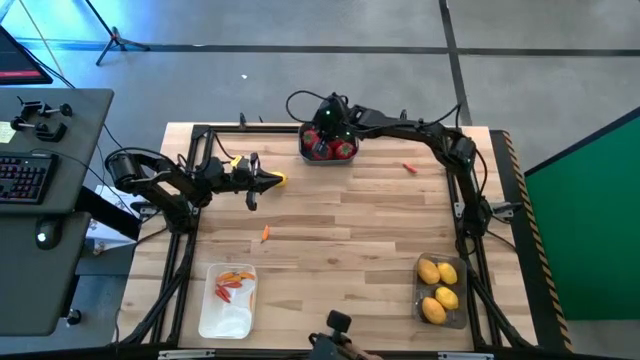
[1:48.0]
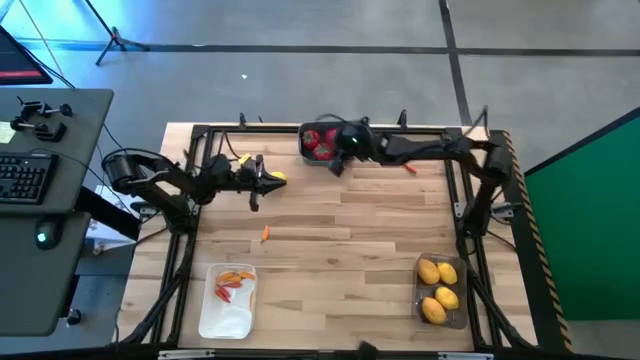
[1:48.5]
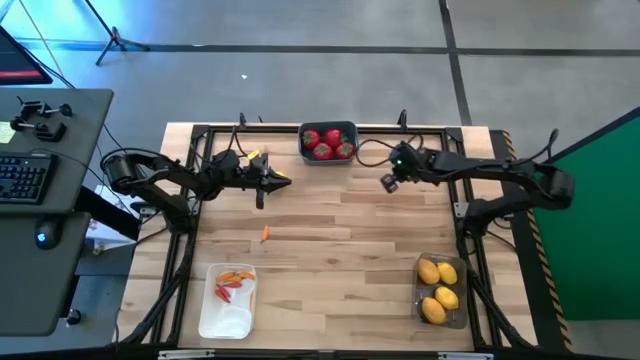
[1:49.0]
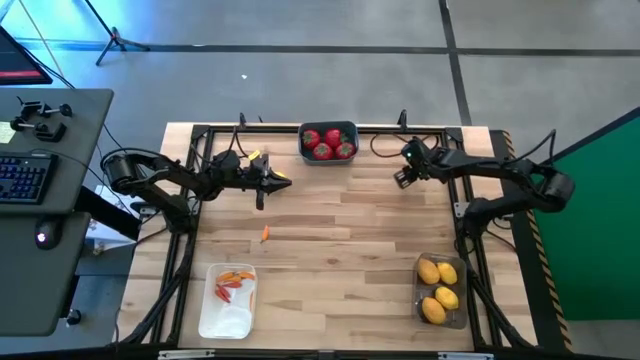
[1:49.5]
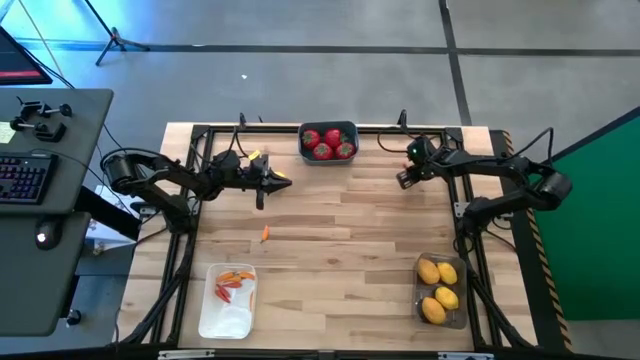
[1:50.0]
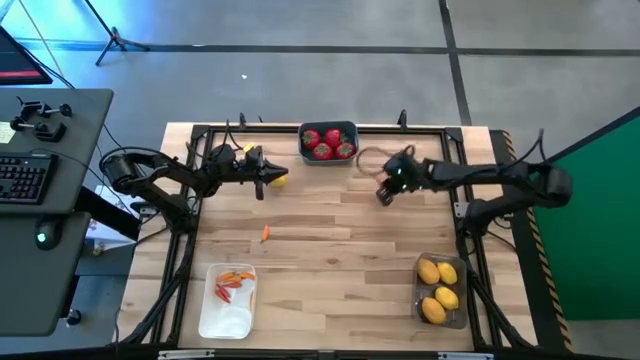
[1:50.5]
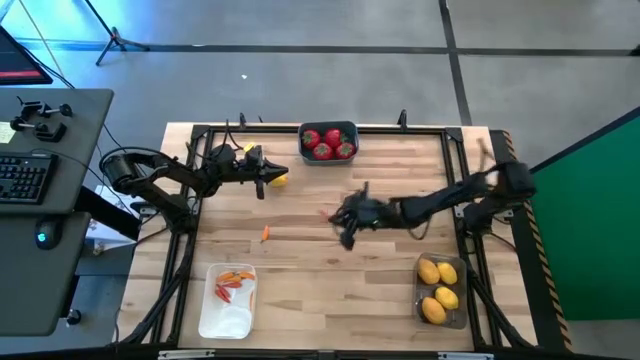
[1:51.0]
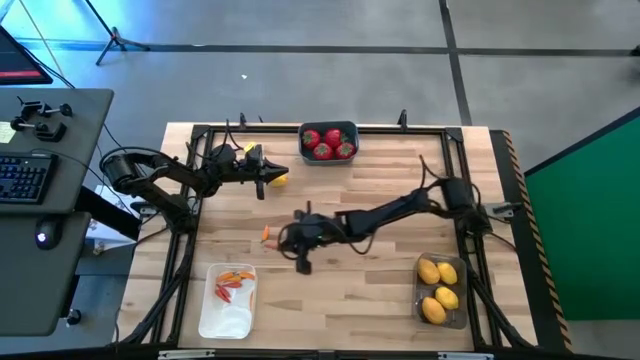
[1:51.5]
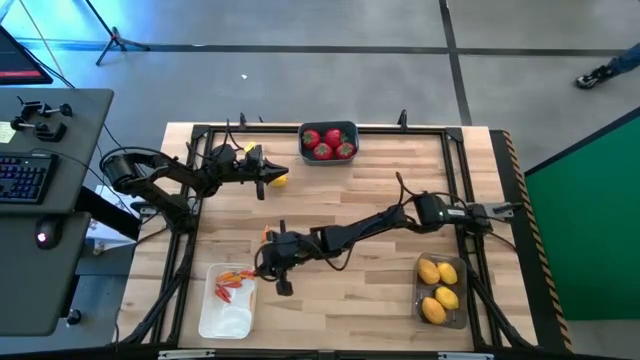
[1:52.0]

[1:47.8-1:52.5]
Task: Sort produce into baskets
Put the red chili pepper into the white bin

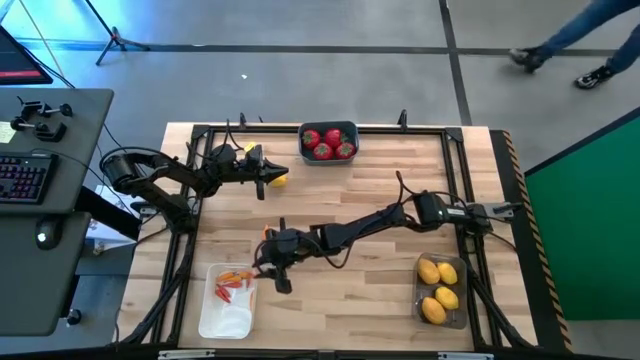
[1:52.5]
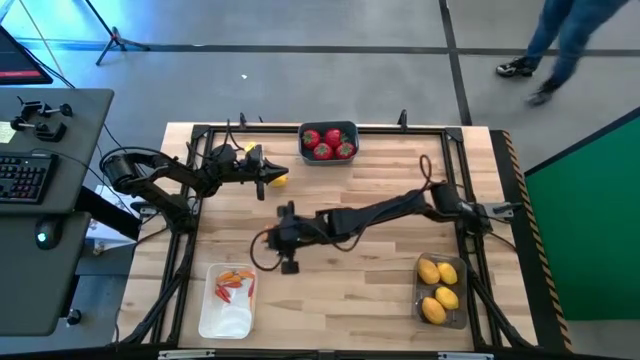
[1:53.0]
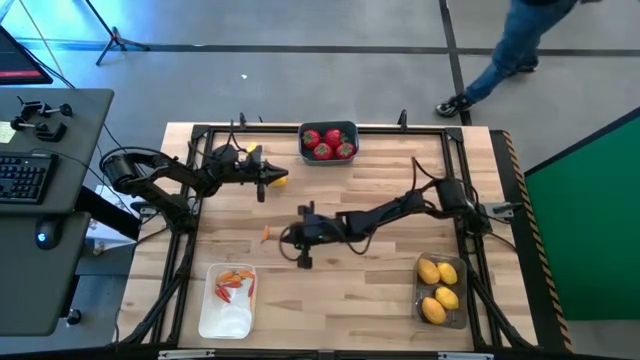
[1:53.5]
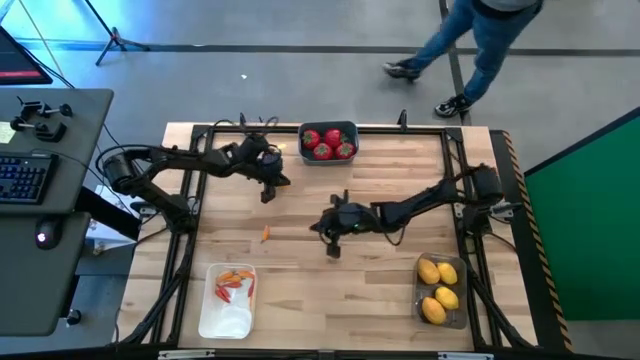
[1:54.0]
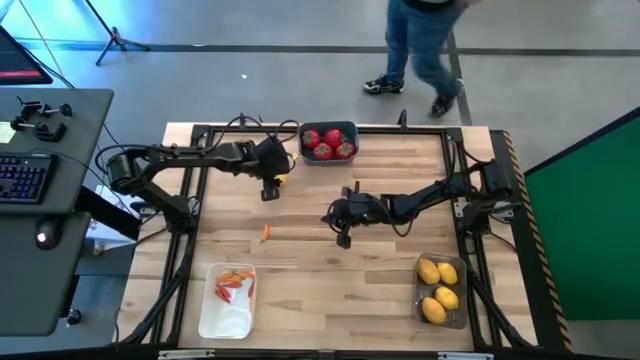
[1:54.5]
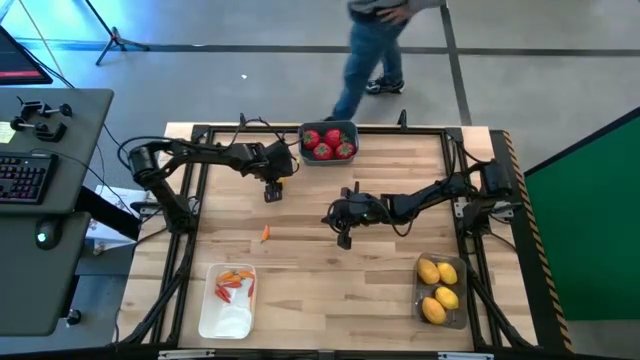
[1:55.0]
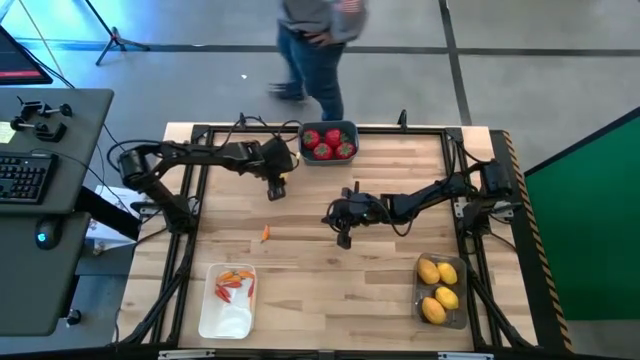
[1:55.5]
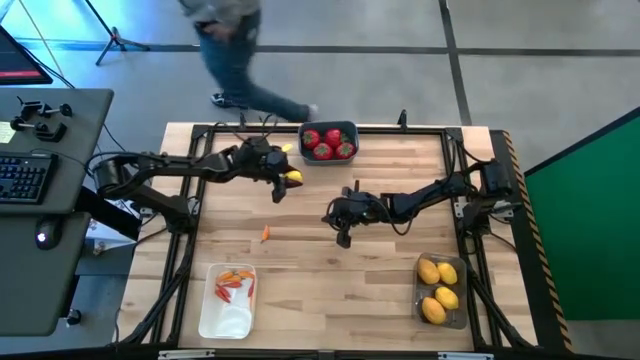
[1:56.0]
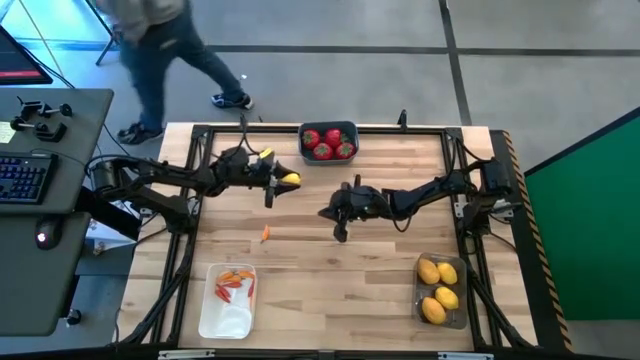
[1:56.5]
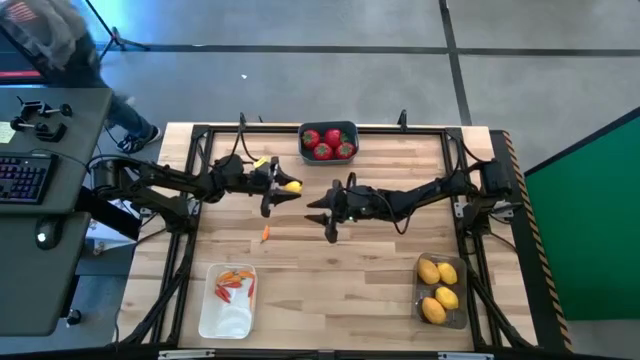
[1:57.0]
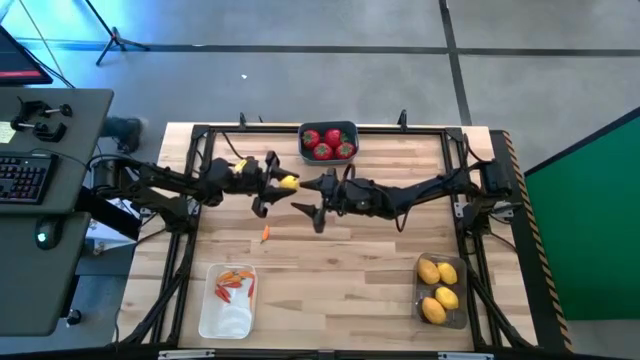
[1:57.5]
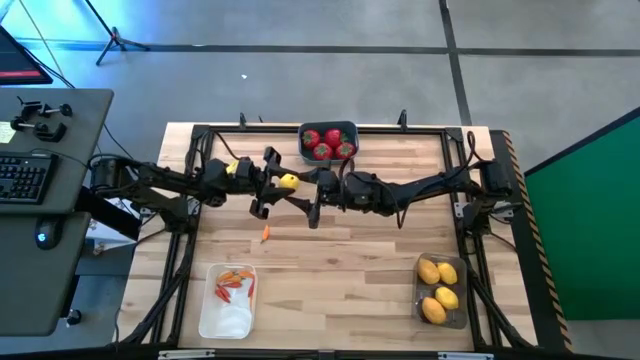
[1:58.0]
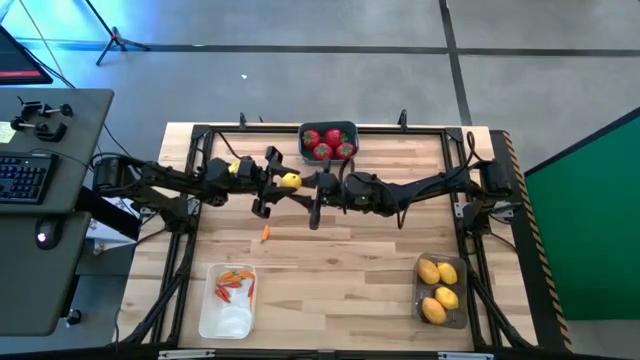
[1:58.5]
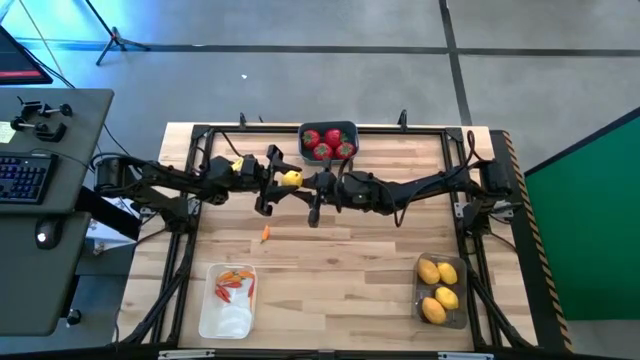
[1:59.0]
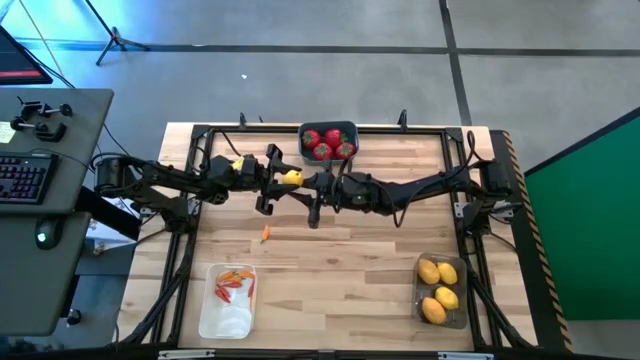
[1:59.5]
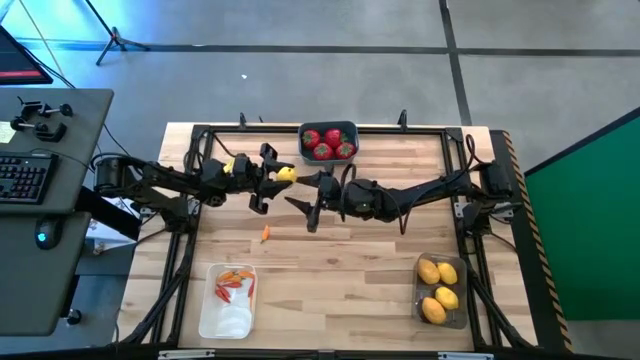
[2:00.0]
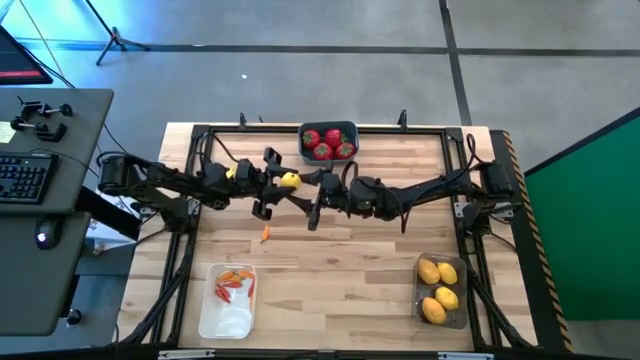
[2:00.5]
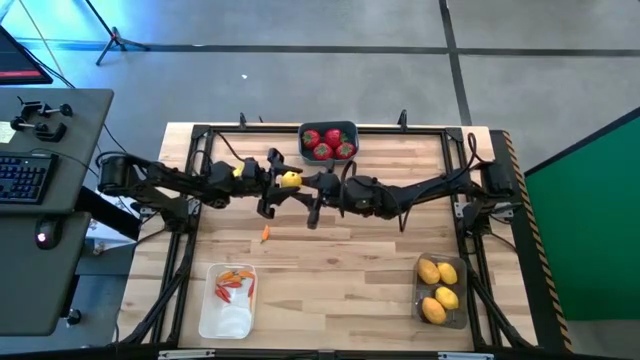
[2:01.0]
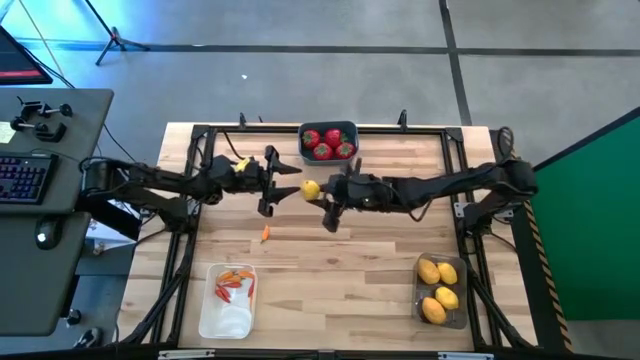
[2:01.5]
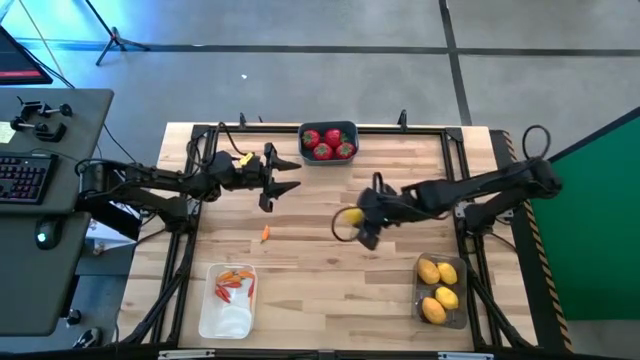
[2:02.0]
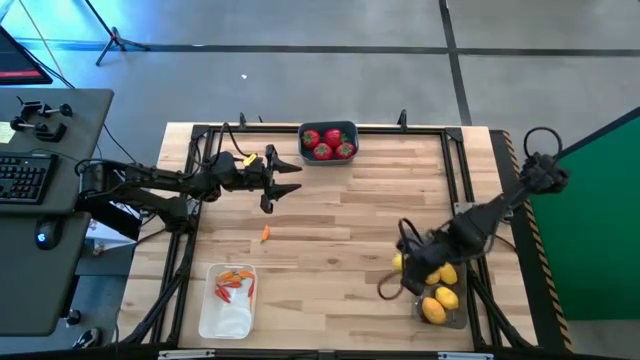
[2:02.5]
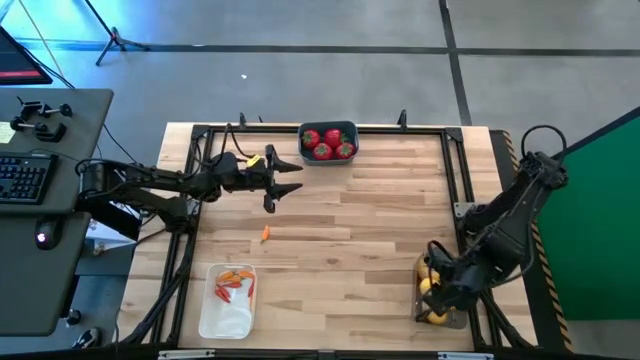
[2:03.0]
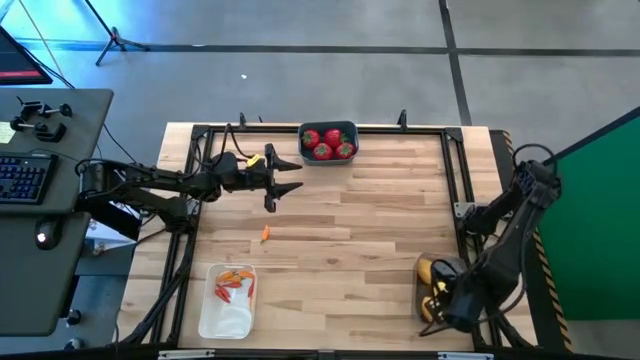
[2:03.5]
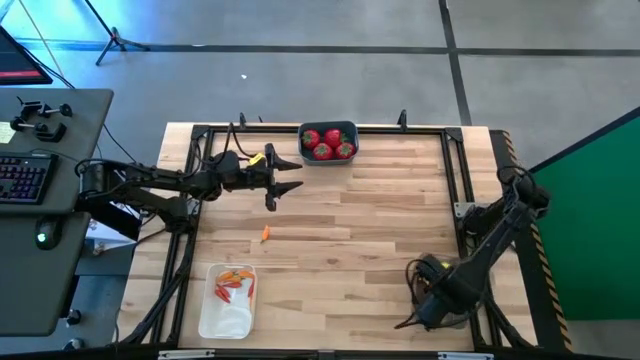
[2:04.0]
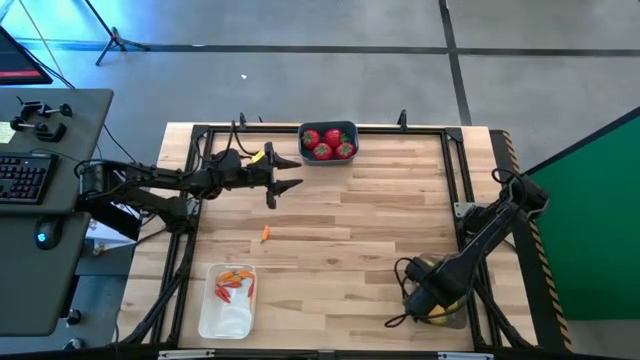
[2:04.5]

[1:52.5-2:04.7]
Put the yellow lemon into the black transparent bin

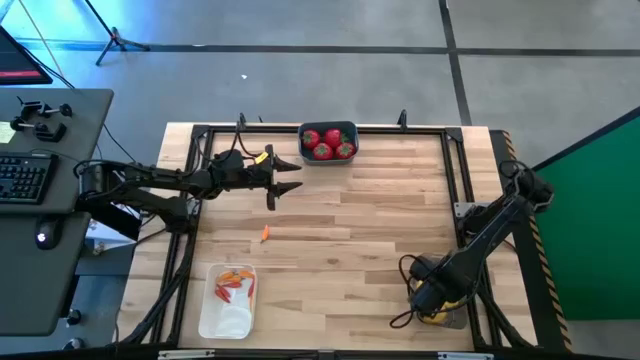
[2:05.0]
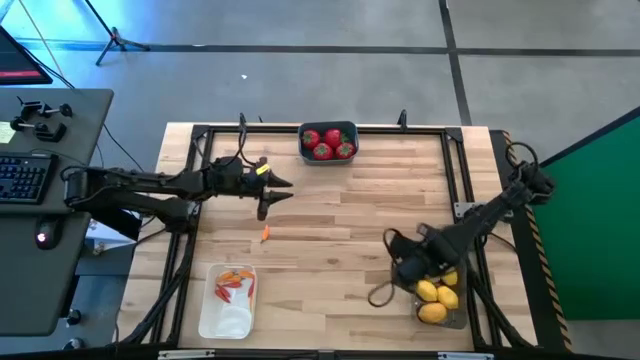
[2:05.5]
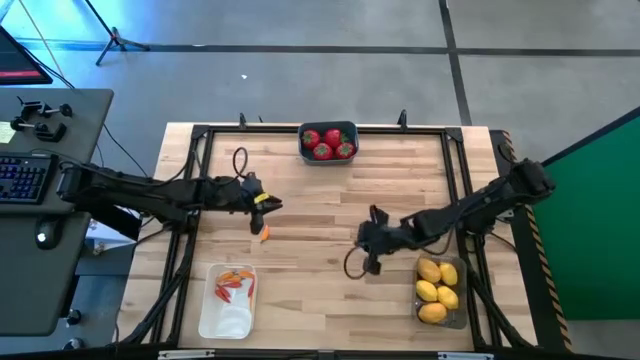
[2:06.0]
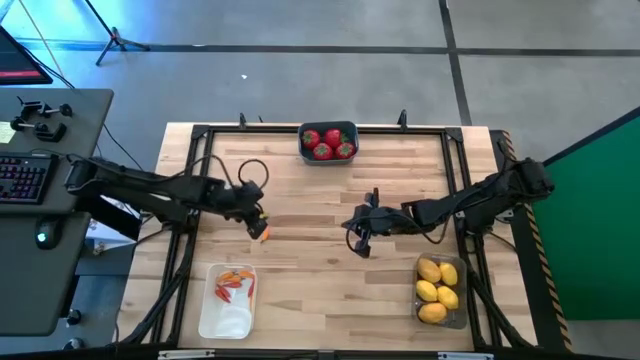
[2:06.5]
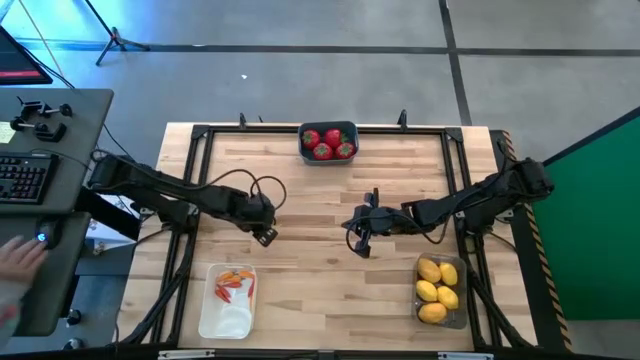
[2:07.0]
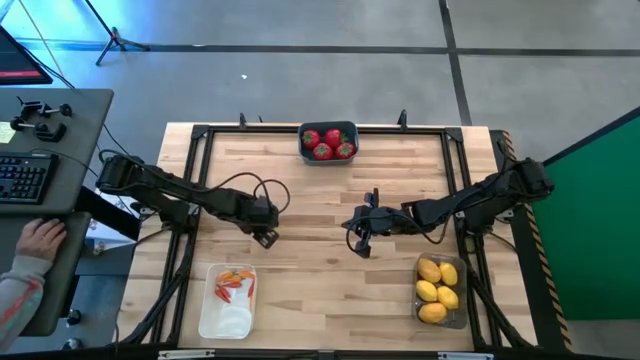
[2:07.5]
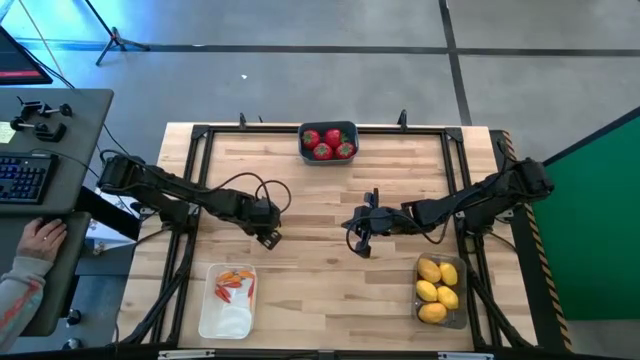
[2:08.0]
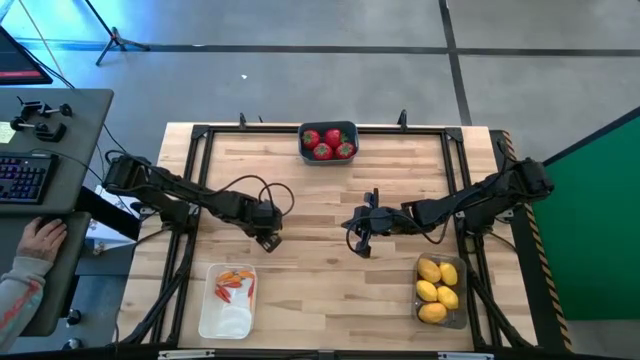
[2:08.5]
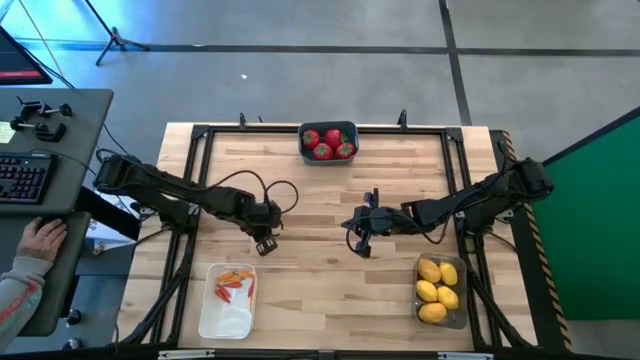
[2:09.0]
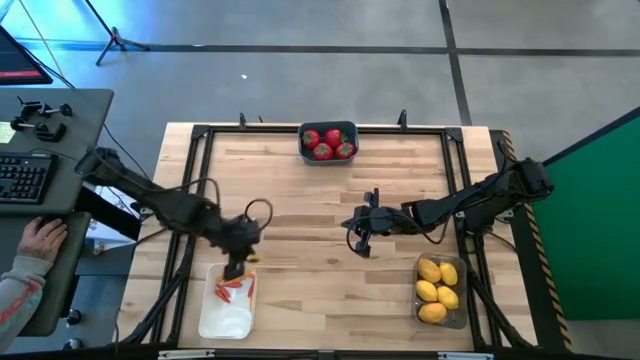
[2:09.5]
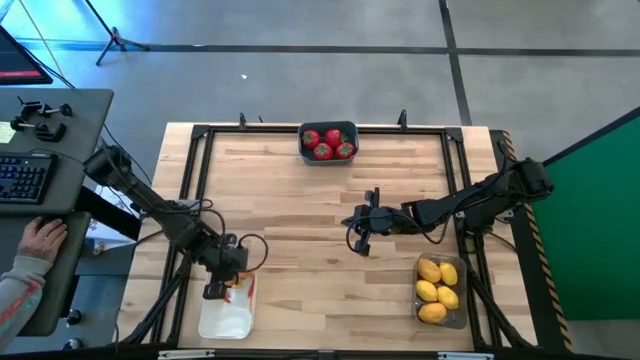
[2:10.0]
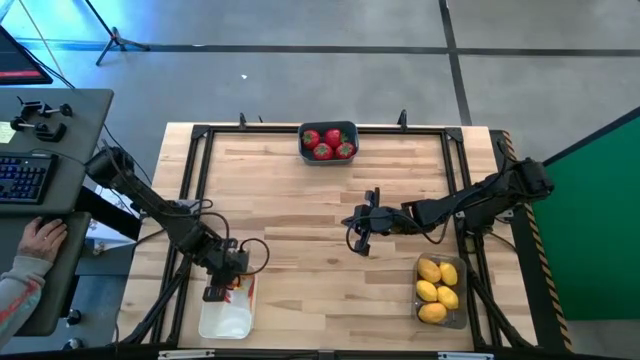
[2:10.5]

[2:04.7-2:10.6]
Put the orange chili pepper into the white bin
